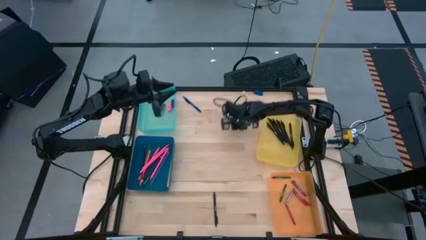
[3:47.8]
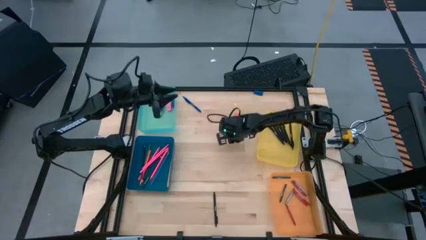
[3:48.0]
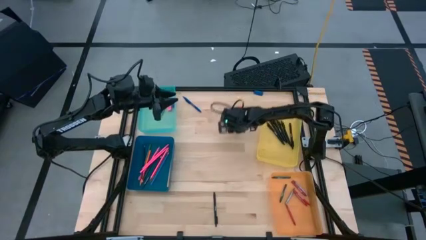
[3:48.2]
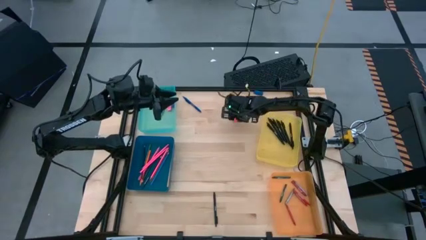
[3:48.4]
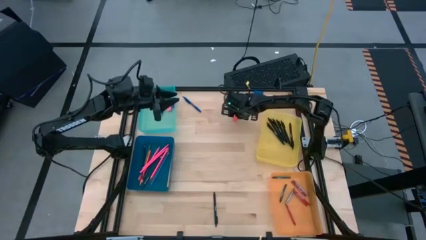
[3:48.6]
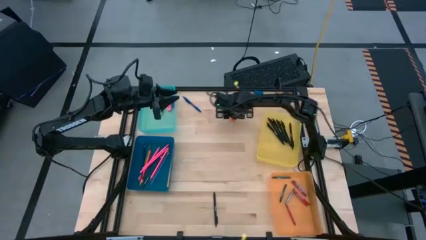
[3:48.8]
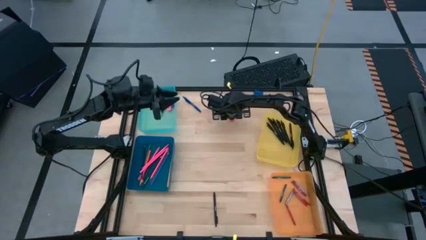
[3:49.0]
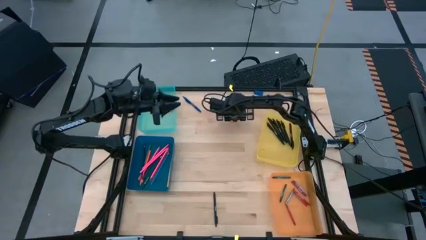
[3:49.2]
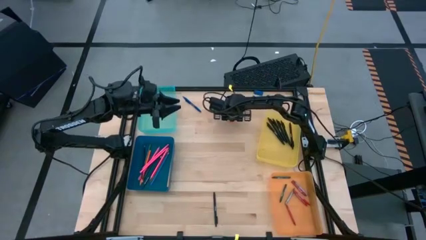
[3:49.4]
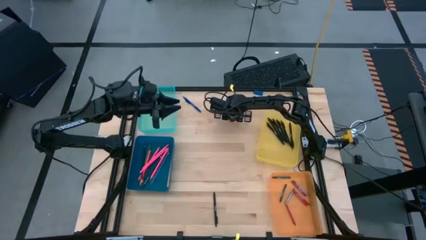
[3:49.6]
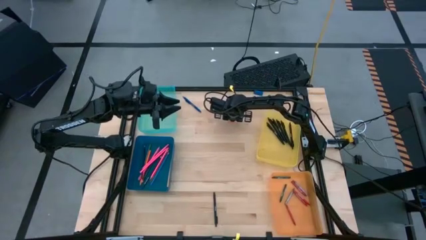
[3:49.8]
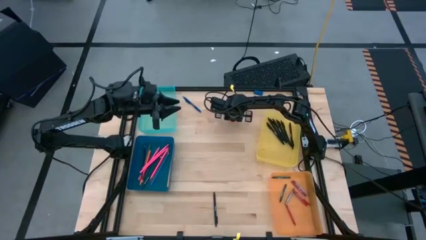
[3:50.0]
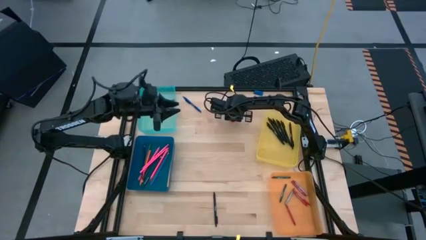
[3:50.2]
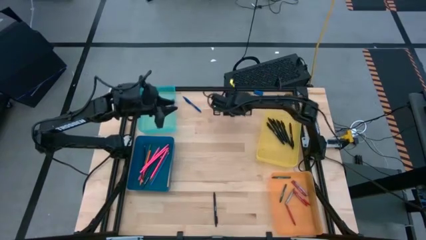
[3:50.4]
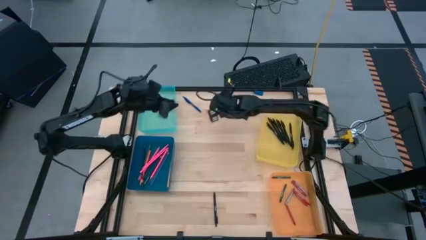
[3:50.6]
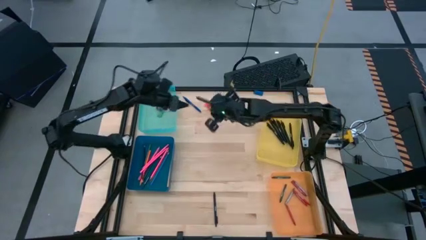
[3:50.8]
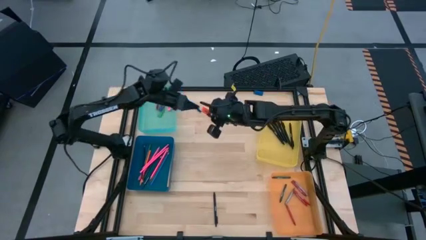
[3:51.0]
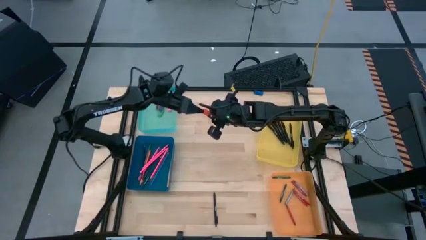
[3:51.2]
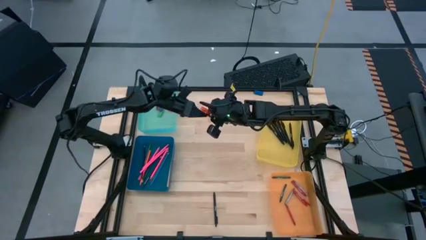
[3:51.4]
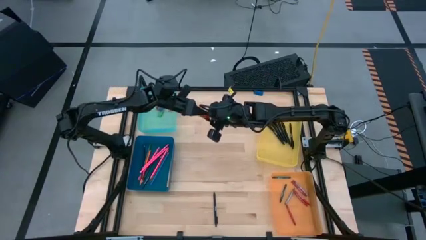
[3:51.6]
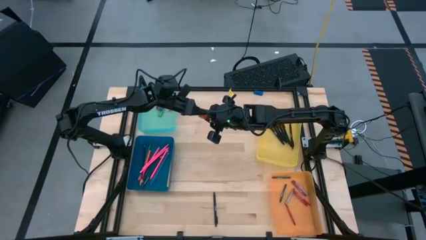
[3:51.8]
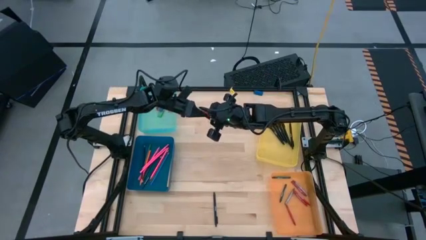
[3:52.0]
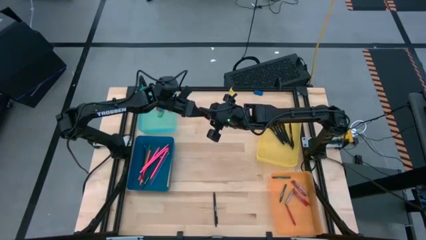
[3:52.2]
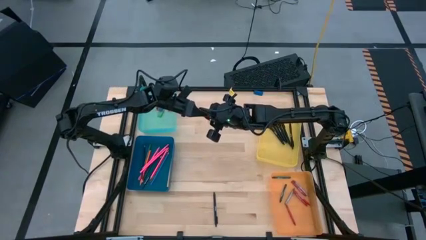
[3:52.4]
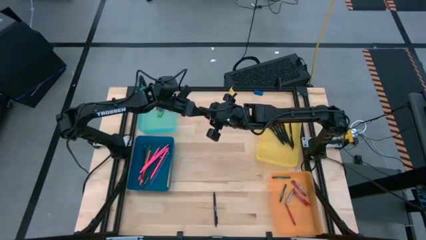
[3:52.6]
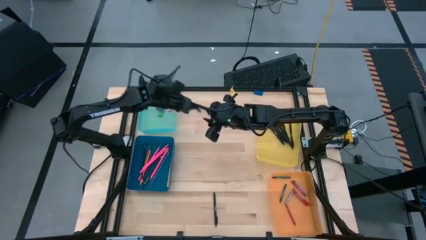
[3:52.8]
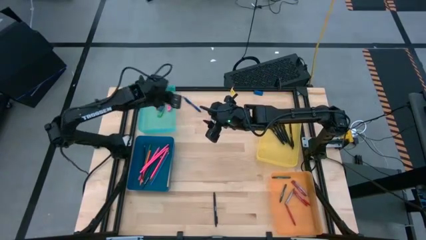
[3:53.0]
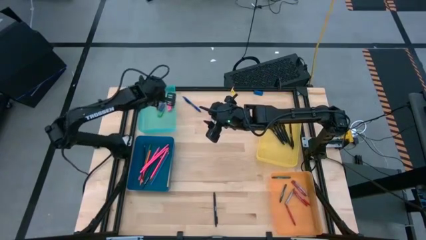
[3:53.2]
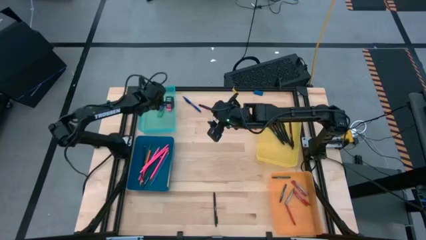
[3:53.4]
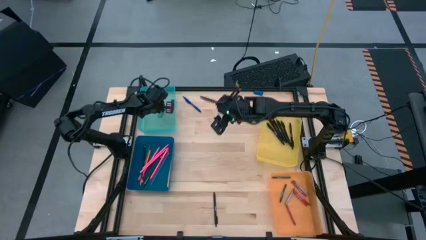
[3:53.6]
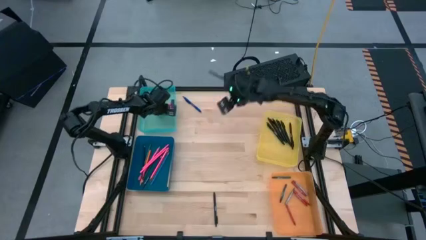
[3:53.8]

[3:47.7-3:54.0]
Task: Sort crayons/erasers/pens/pencils in bins
Put the orange eraser into the light blue bin

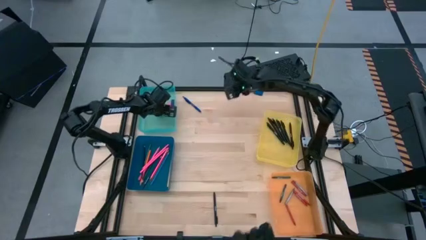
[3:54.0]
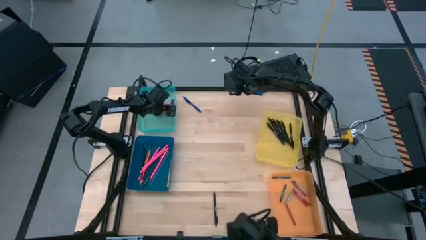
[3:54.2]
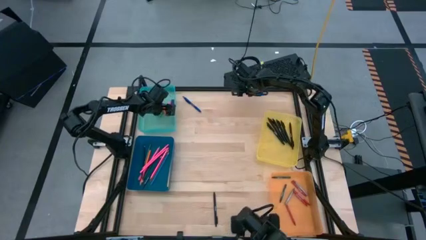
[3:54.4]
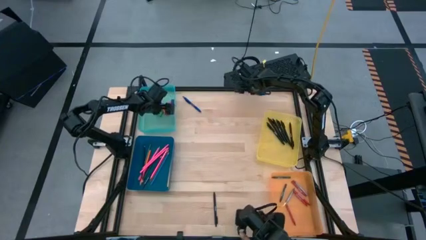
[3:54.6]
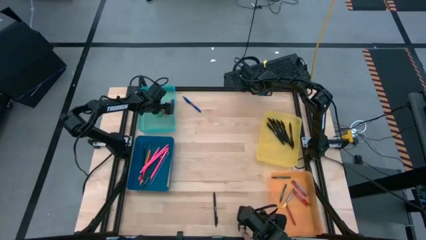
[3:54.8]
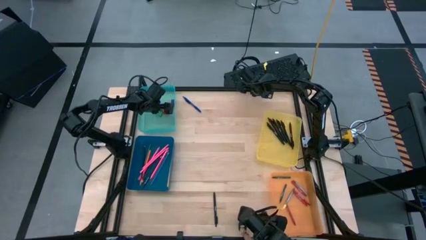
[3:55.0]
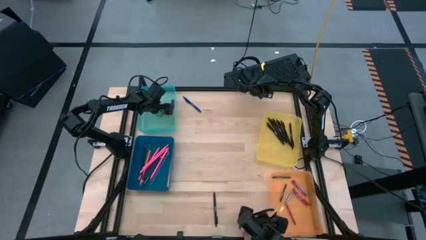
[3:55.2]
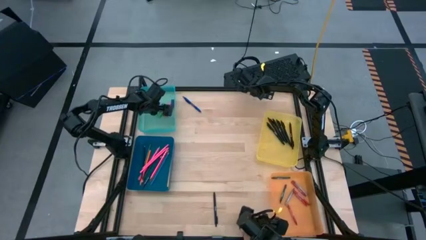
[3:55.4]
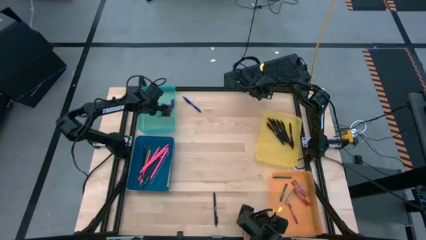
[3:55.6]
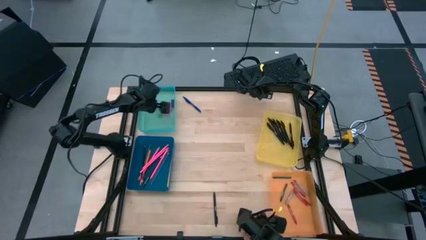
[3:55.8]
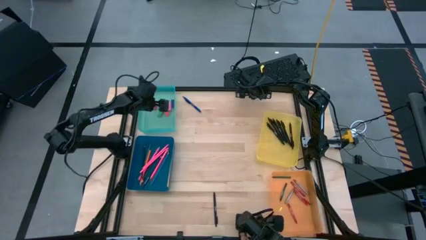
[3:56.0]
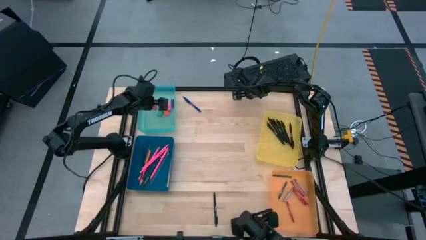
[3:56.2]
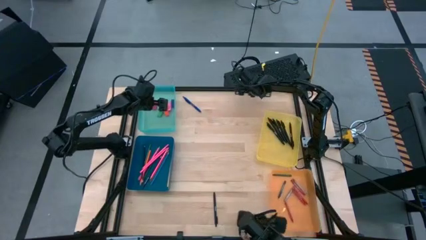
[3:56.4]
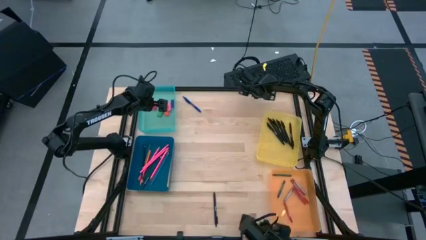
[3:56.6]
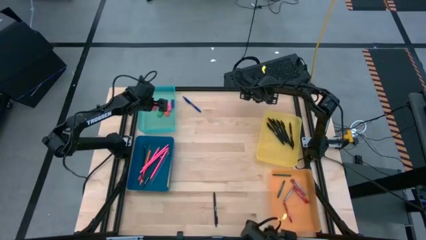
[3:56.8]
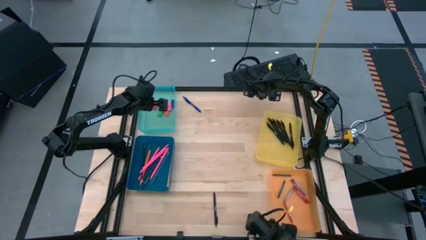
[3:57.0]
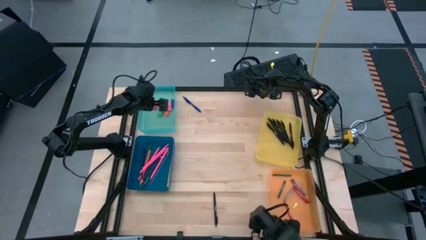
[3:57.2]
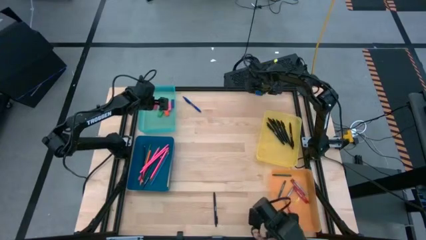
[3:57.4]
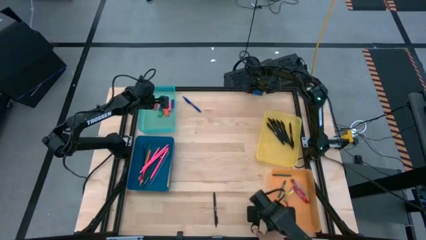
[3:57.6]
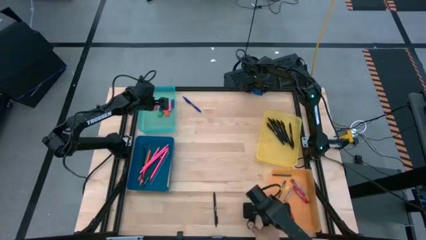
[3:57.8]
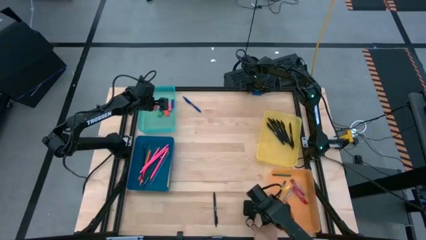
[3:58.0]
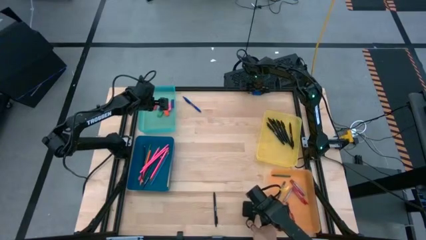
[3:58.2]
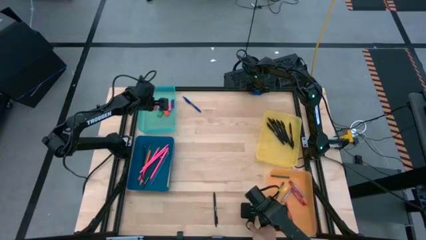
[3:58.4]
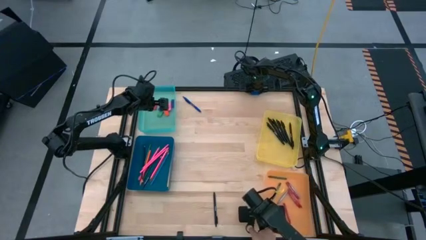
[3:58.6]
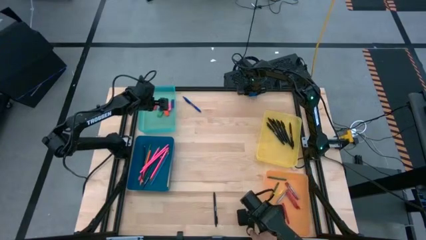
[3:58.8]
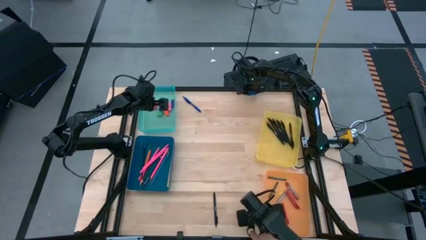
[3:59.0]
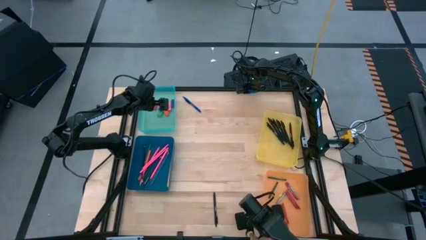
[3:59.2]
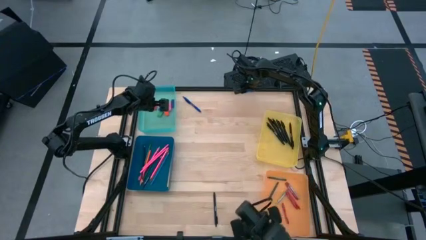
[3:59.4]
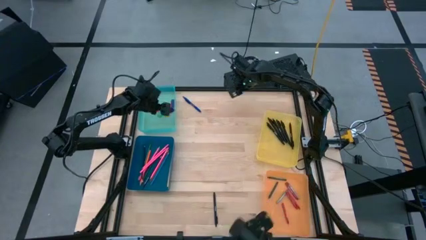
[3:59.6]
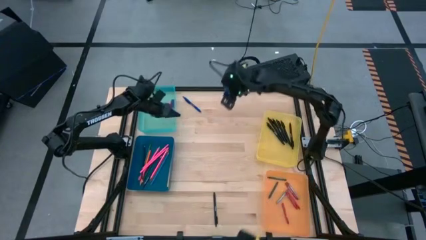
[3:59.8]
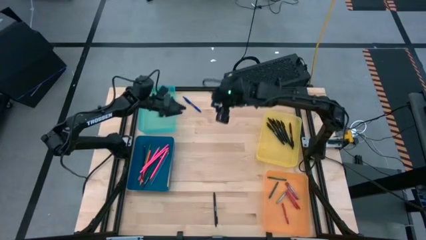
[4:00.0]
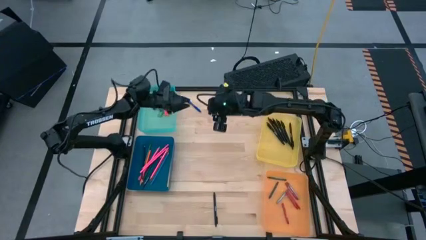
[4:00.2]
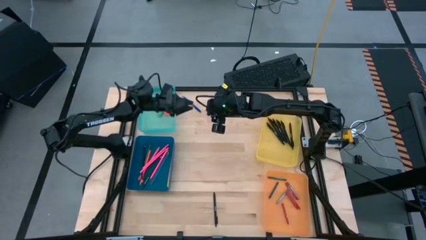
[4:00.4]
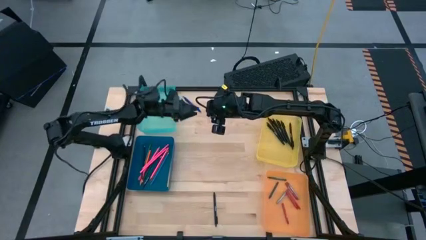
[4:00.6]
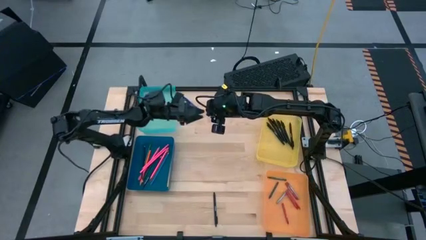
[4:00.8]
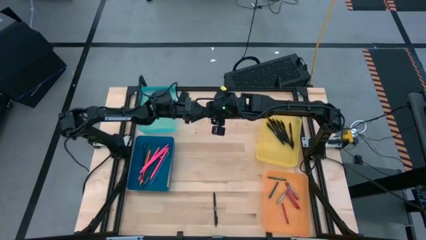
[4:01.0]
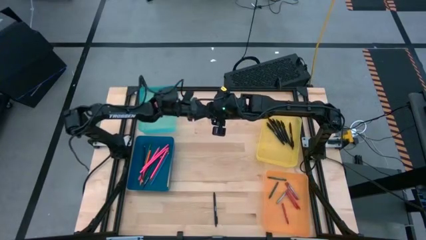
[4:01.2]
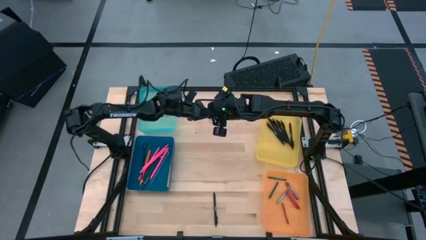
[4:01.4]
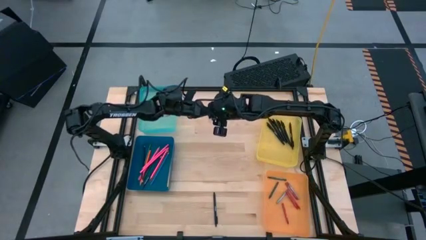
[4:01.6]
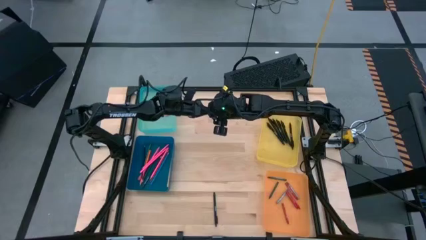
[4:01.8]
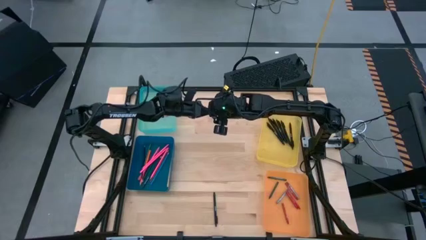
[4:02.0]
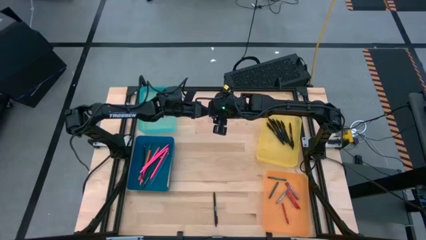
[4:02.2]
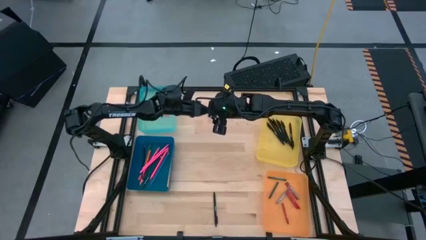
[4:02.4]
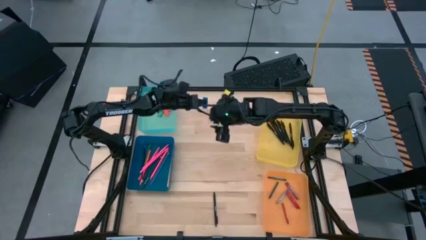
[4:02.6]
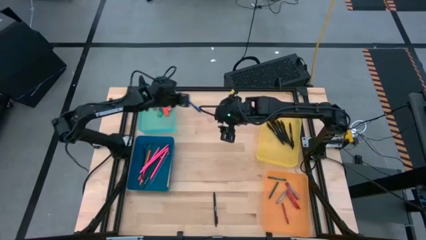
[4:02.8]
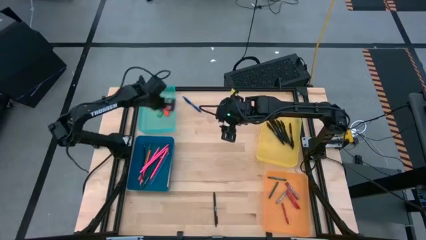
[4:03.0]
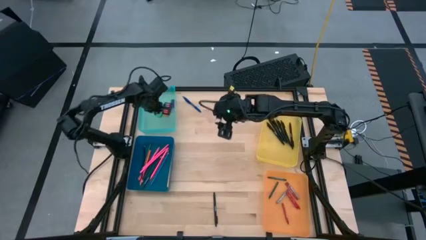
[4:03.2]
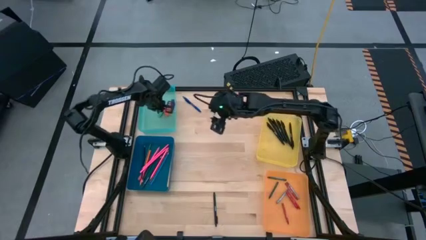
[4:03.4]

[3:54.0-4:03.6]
Put the blue eraser into the light blue bin

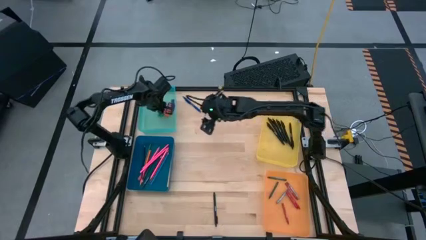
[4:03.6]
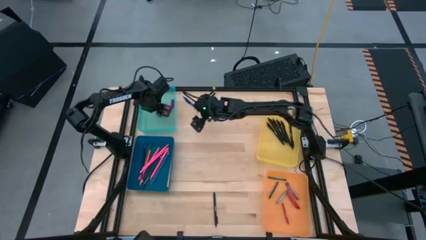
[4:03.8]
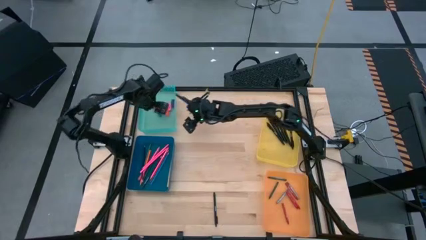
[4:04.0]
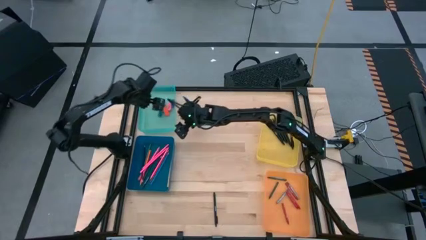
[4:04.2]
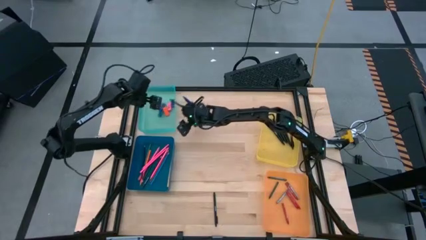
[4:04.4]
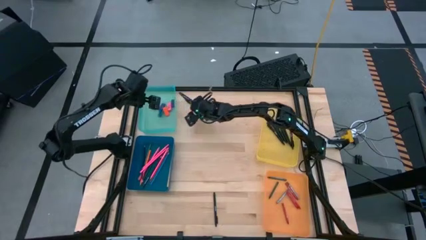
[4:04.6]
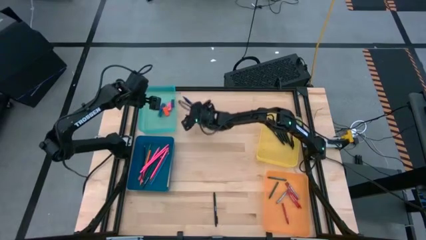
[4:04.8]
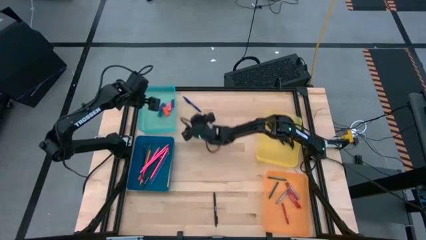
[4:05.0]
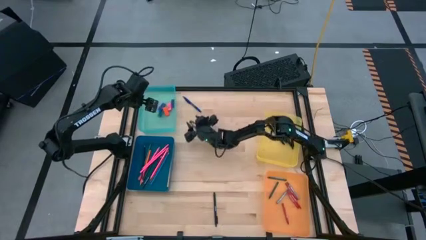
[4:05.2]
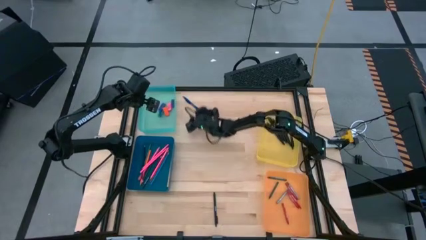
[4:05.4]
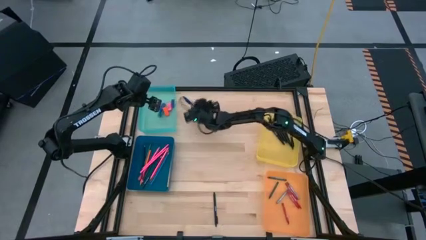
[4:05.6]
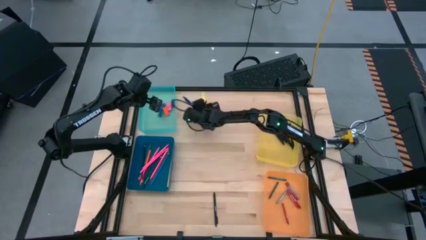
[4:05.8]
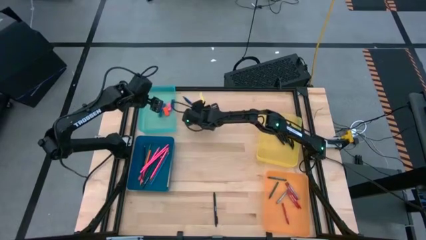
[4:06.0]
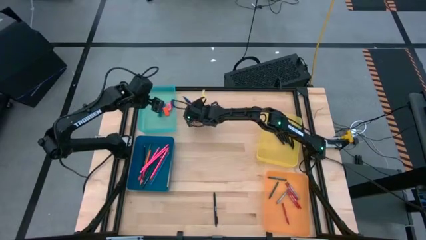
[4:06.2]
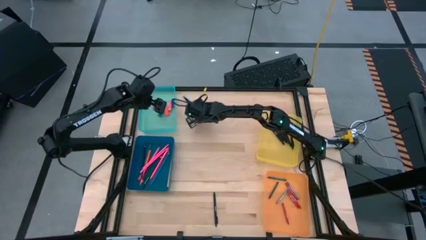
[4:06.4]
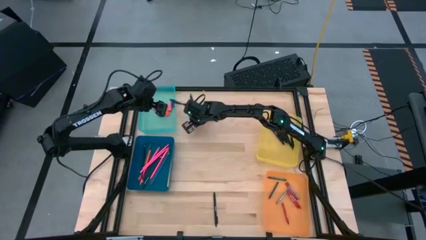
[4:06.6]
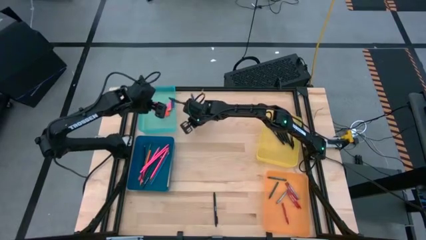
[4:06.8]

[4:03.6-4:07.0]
Put the blue pen into the yellow bin
